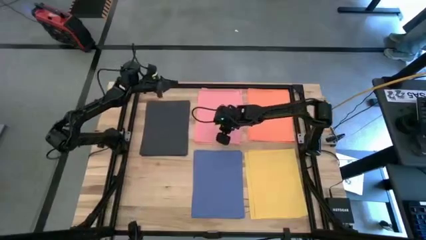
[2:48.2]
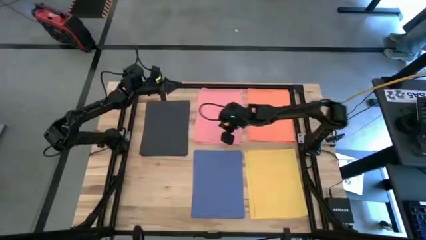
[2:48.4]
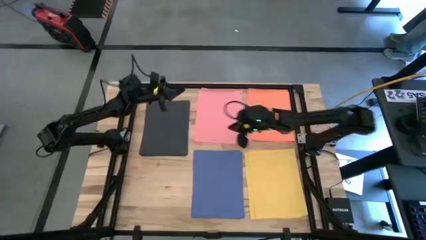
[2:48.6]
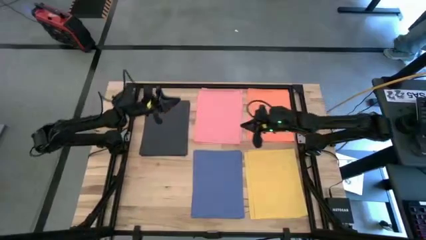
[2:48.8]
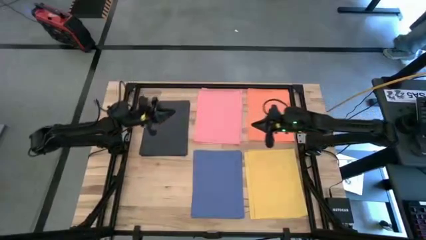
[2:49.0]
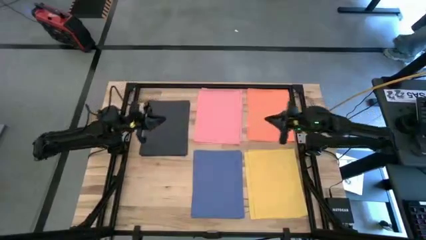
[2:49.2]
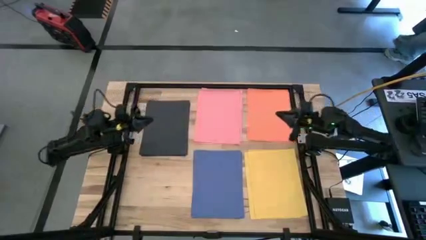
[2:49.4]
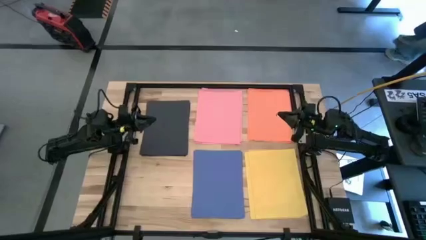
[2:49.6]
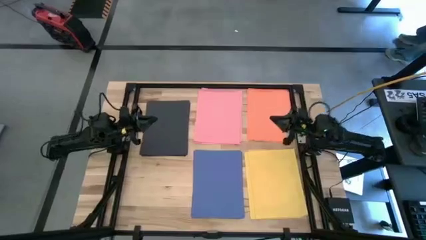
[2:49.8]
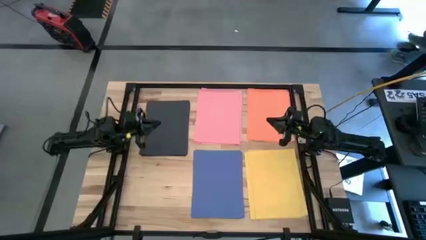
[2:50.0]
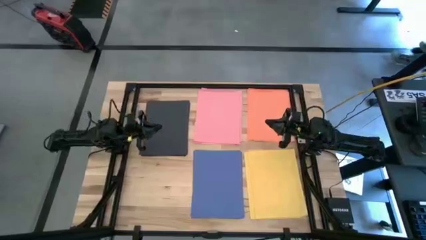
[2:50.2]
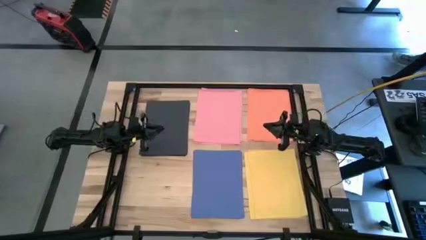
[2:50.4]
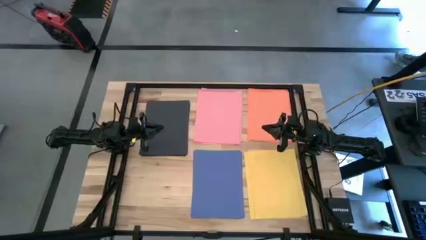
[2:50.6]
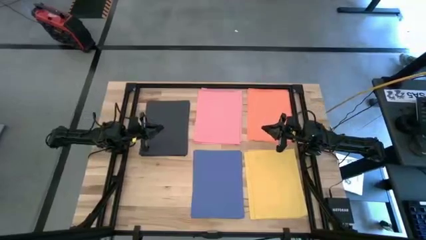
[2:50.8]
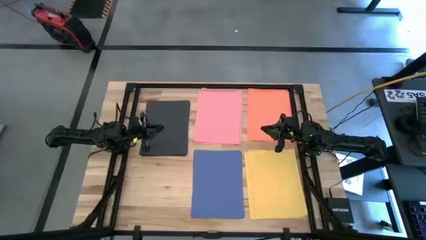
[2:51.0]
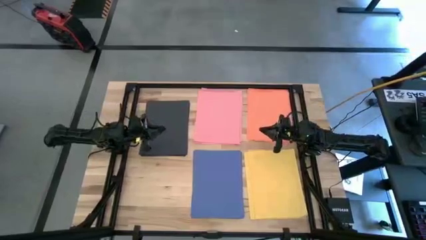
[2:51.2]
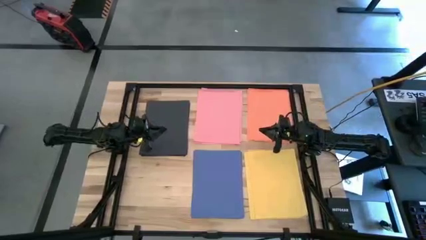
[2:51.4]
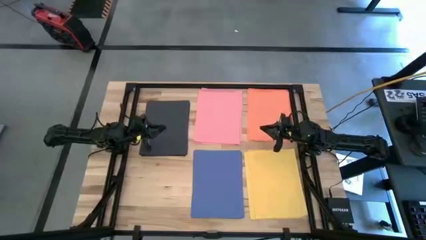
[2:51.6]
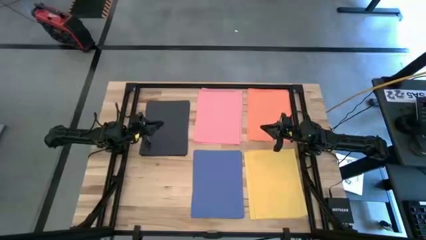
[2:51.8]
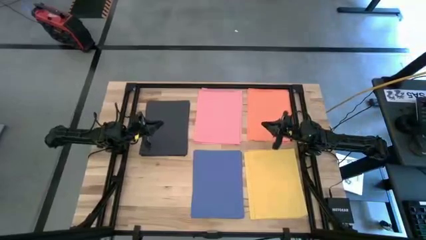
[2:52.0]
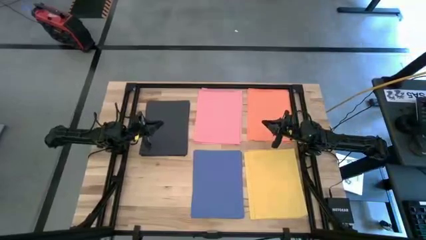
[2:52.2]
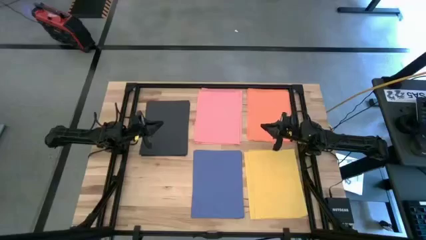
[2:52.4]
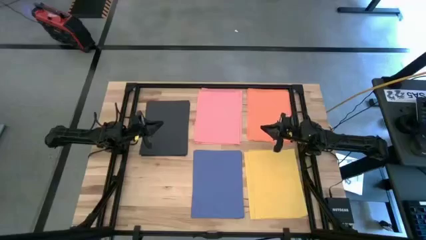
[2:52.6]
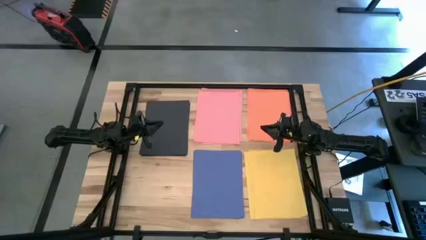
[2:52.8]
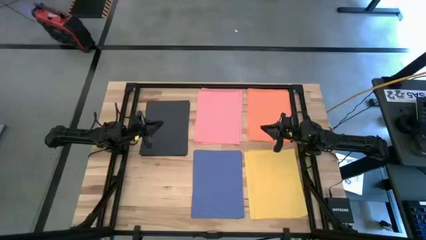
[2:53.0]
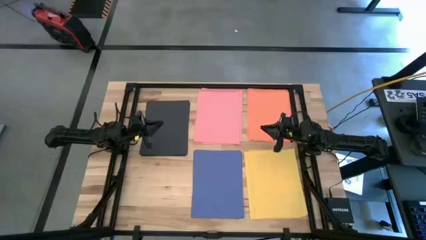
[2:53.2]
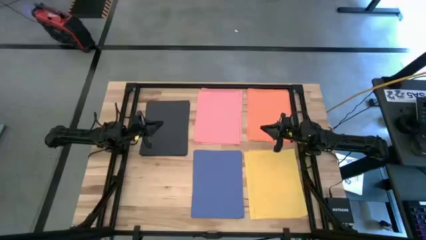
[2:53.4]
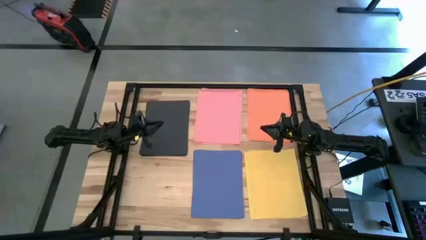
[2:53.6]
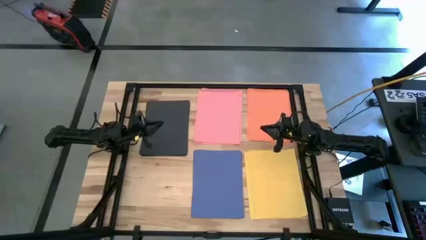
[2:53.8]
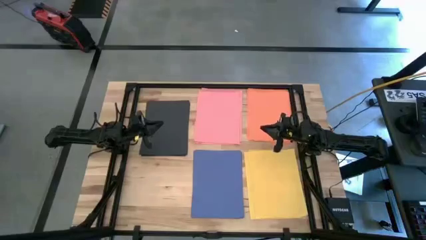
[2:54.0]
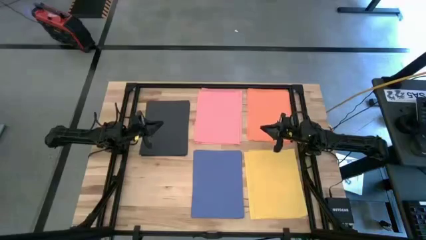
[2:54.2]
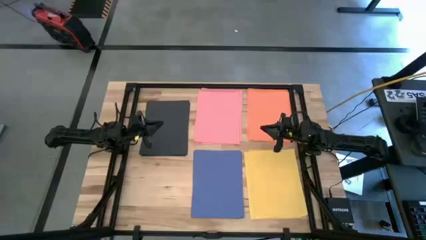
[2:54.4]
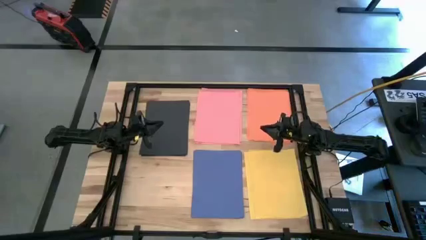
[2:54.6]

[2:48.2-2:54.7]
Task: Organize paper
Return to Home Position

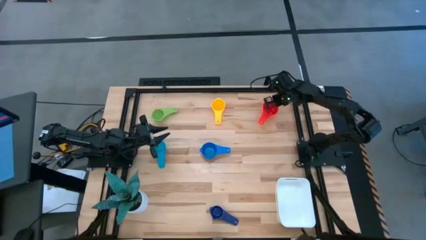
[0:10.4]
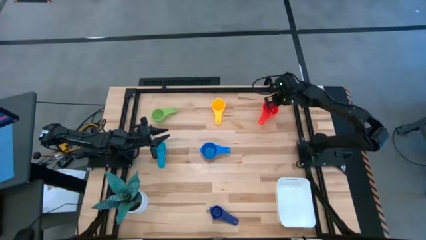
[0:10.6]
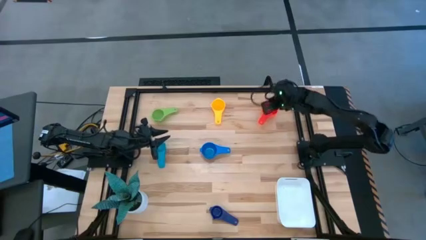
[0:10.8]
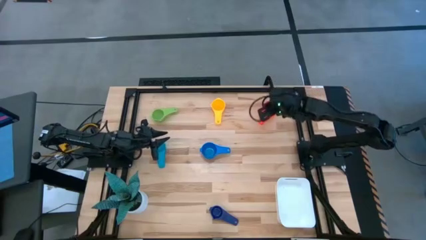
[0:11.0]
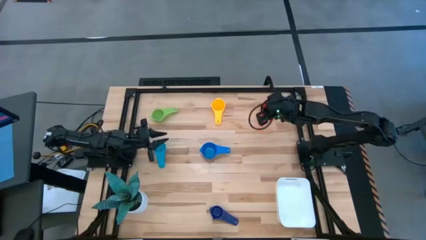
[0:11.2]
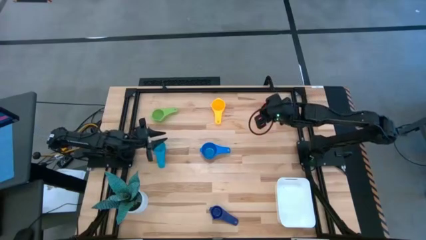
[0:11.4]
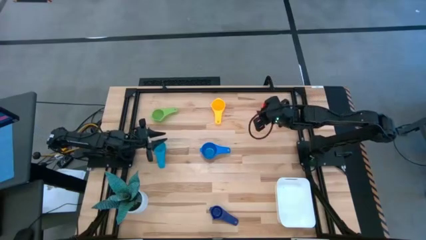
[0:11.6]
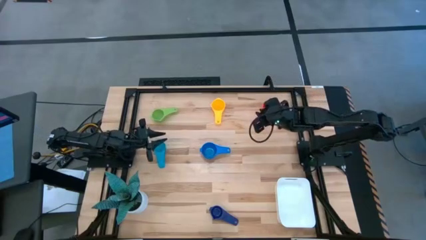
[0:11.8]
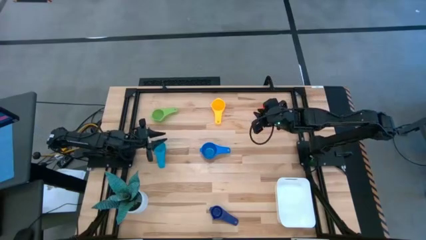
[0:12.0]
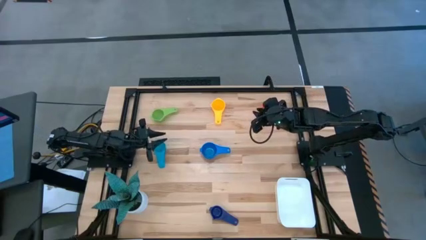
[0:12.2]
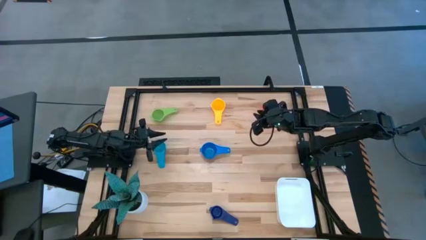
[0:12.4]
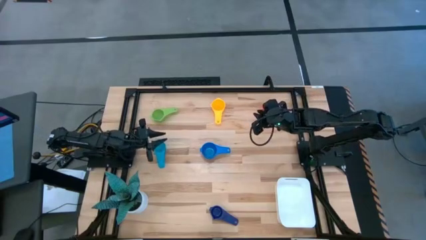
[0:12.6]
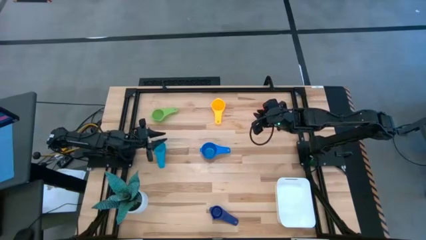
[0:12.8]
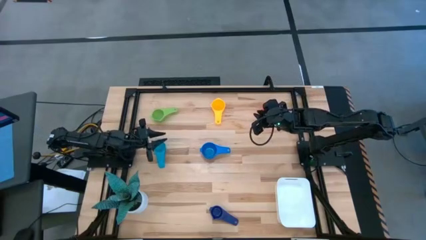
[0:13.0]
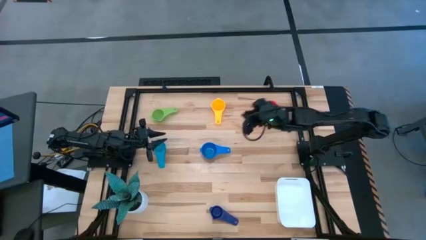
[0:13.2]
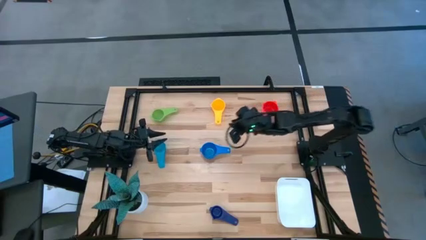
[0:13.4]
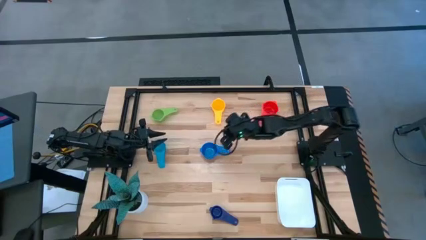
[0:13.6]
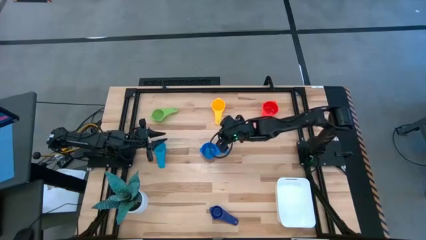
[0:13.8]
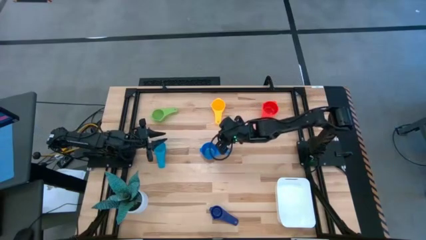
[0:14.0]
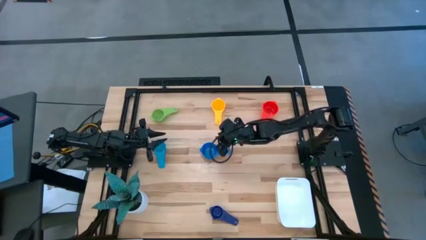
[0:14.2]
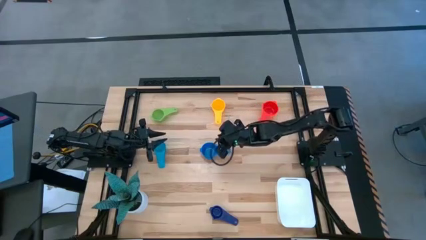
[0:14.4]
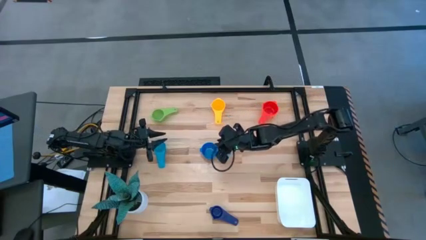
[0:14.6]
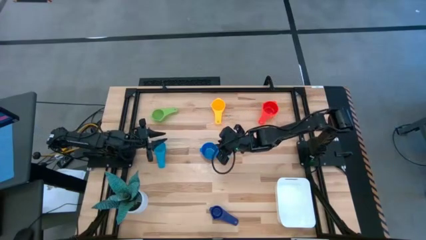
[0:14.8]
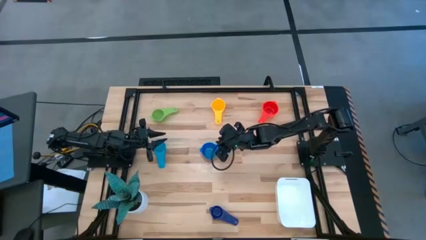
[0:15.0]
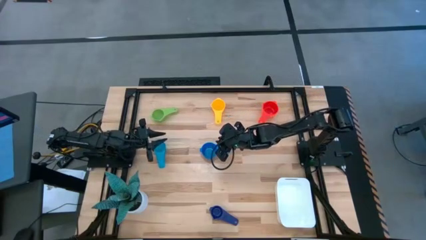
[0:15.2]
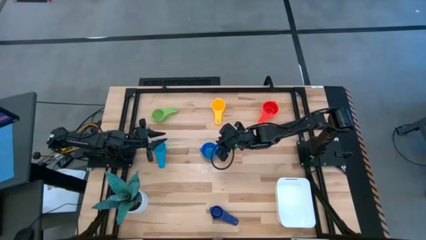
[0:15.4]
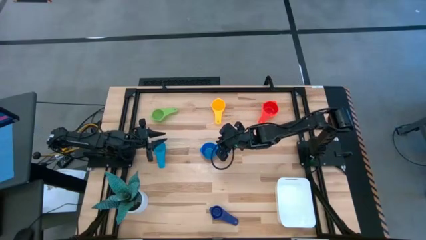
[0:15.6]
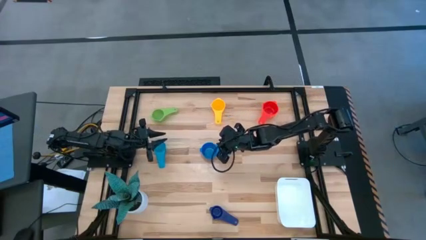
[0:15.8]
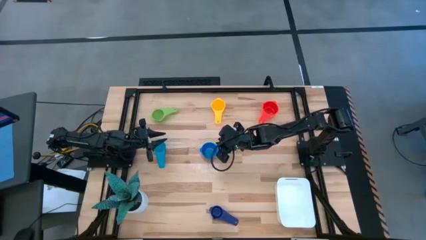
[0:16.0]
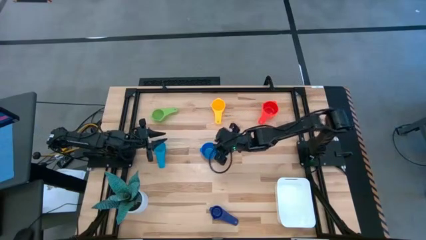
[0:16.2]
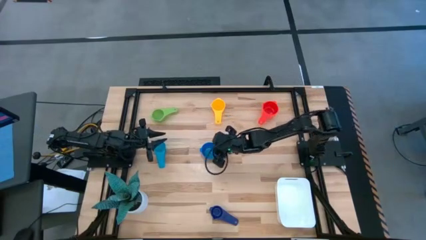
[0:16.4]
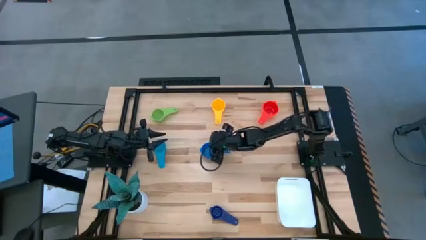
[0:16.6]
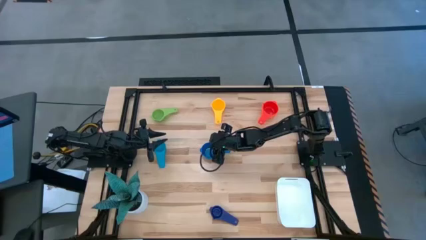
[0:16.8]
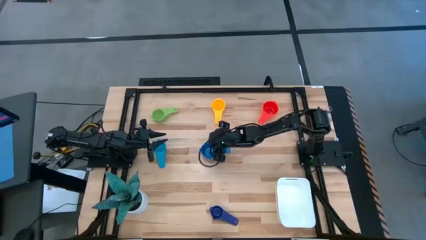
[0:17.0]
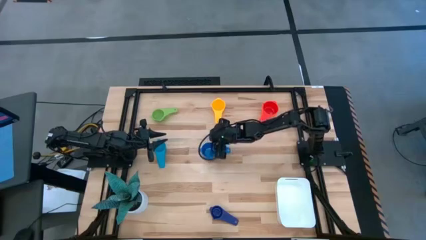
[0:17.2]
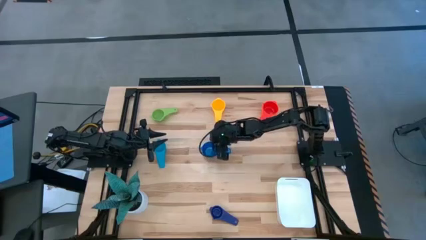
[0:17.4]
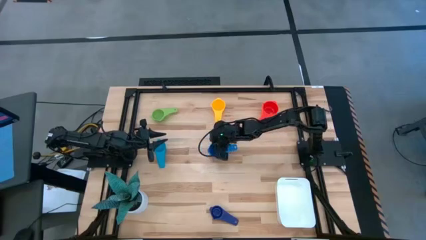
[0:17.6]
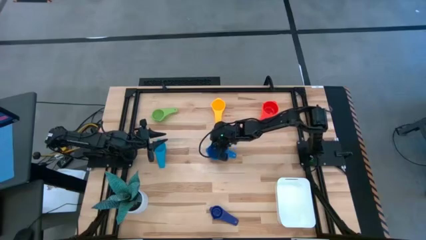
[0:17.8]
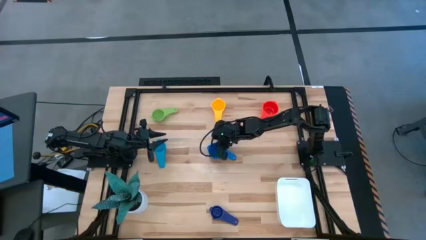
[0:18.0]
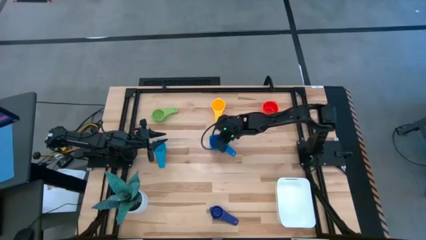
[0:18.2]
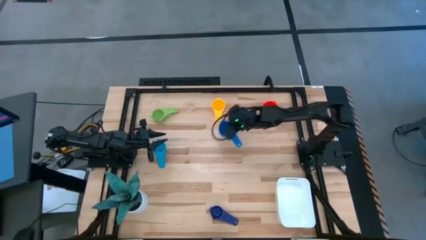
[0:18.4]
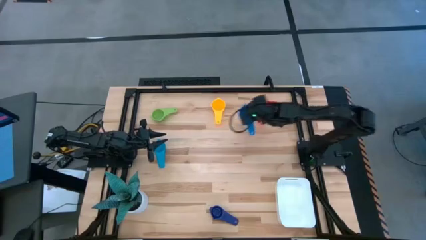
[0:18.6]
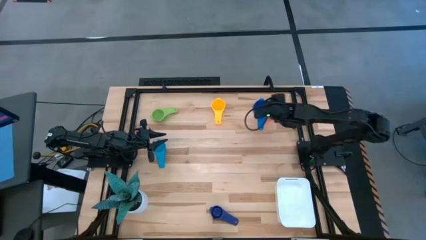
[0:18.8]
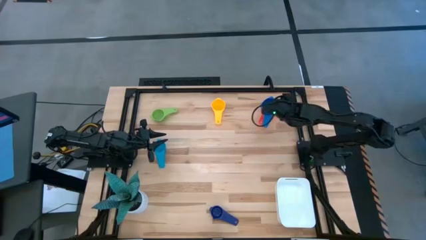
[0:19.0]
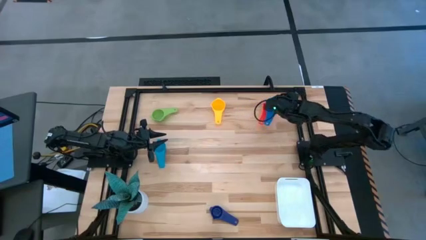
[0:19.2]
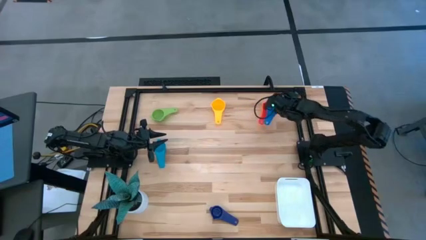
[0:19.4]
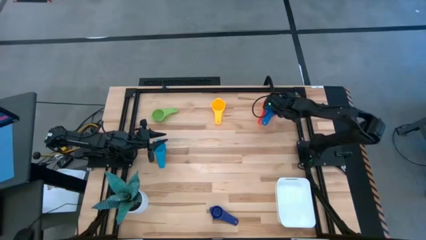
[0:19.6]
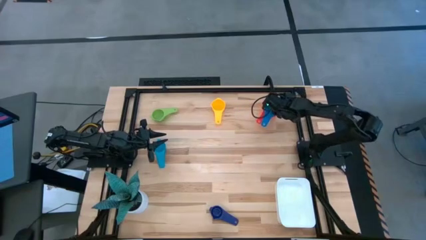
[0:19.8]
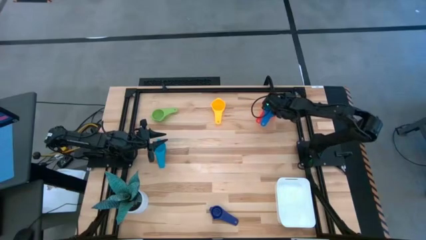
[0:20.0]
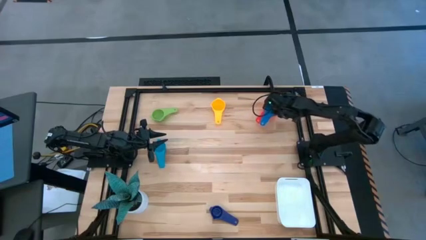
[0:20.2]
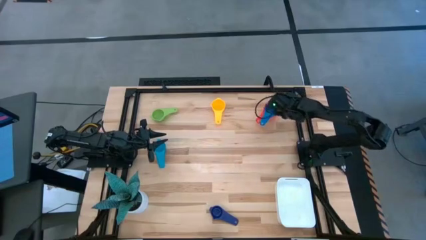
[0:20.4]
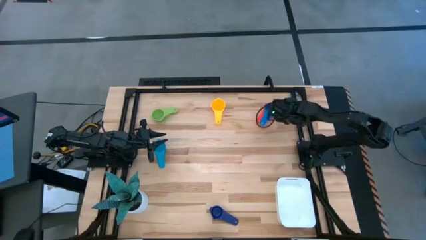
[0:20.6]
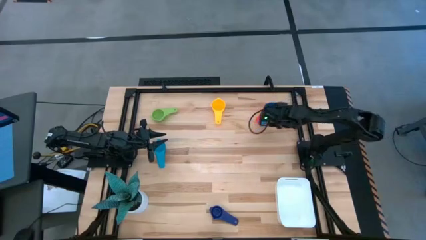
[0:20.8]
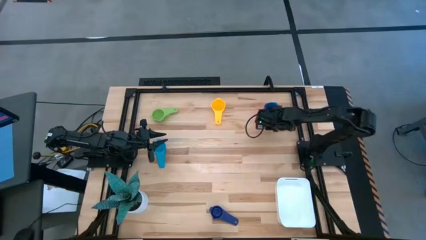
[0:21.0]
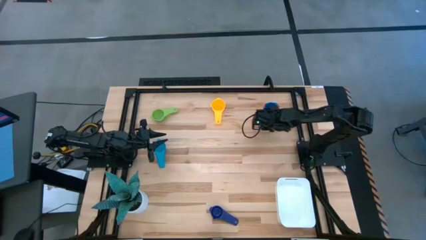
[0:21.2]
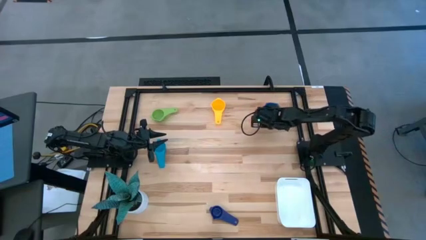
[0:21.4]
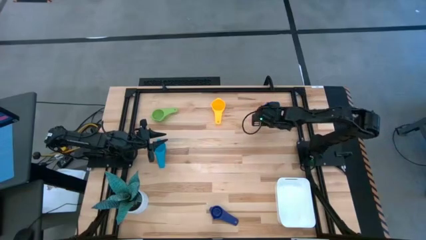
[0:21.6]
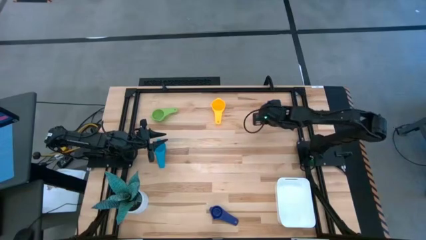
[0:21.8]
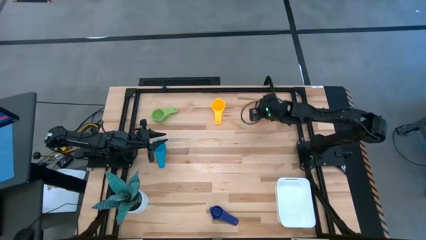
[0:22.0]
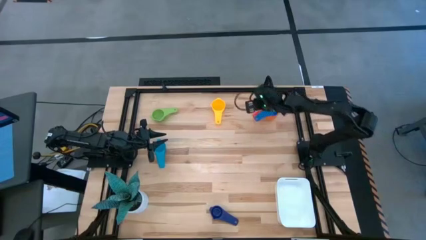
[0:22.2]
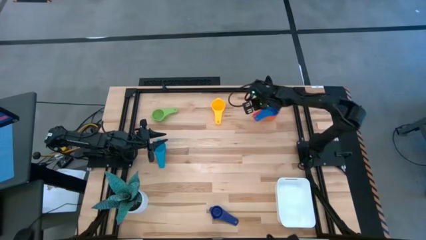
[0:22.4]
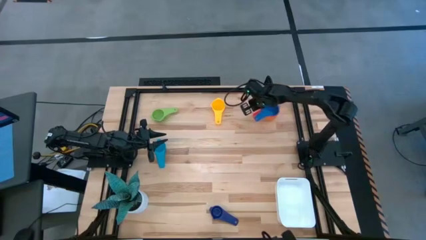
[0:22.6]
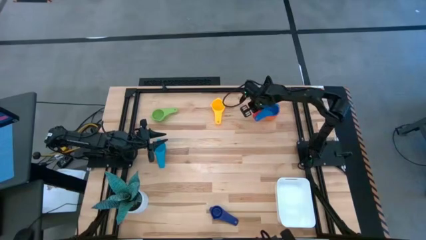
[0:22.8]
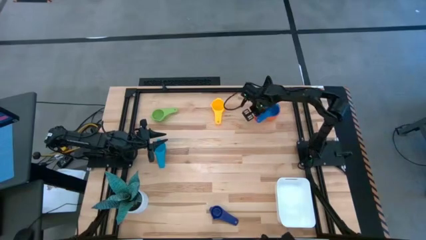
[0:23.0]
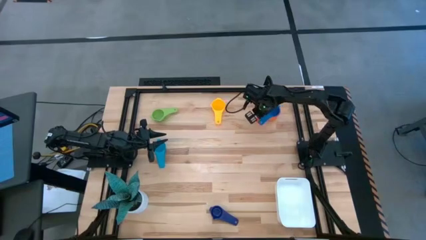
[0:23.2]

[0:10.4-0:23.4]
Task: Nest measuring cups in basket
Stack the blue measuring cup on the red measuring cup
